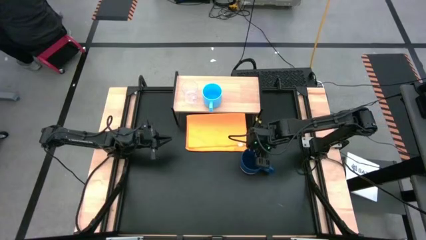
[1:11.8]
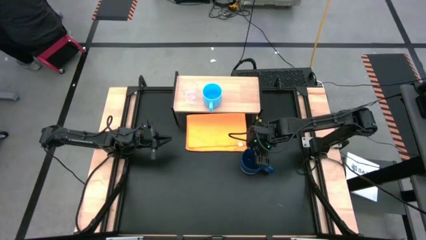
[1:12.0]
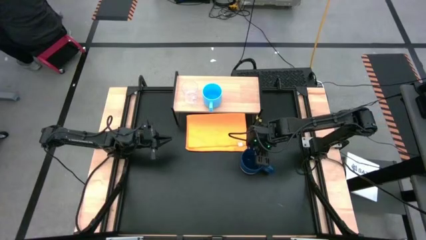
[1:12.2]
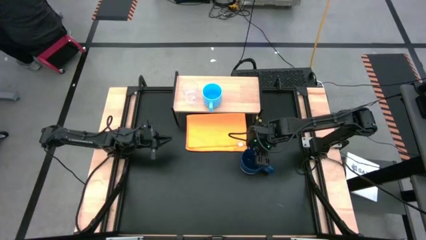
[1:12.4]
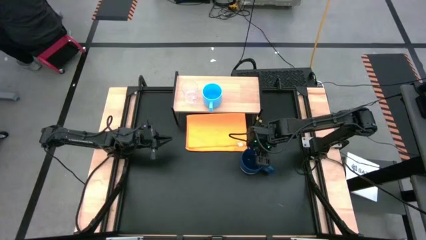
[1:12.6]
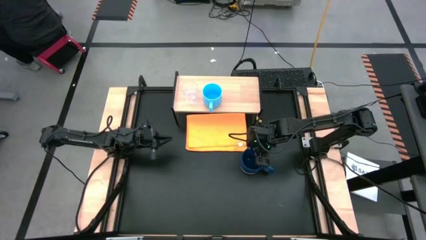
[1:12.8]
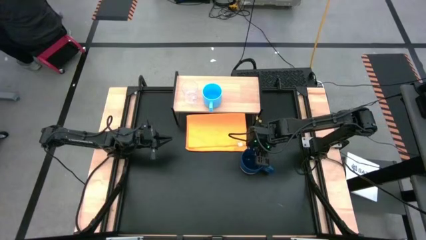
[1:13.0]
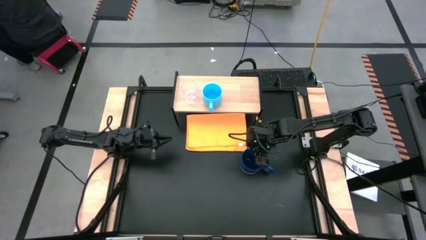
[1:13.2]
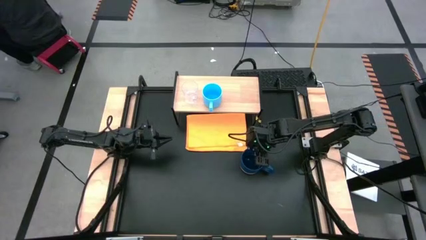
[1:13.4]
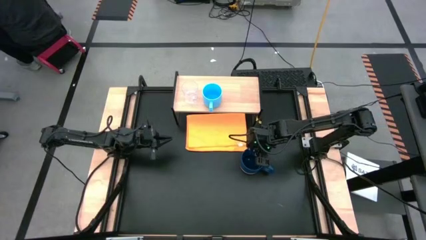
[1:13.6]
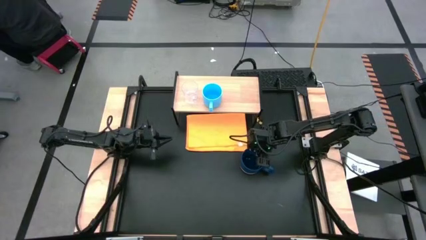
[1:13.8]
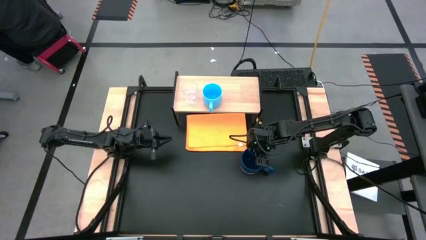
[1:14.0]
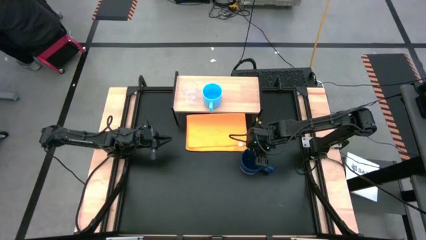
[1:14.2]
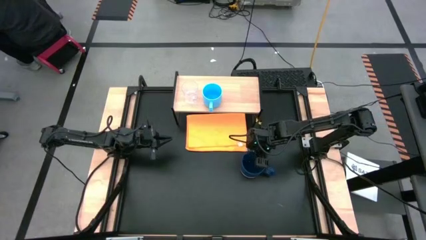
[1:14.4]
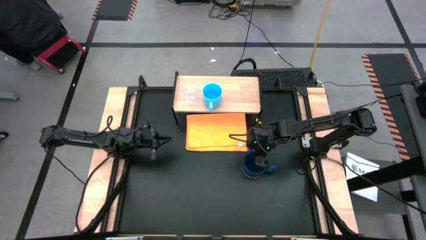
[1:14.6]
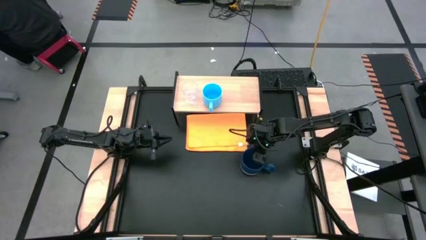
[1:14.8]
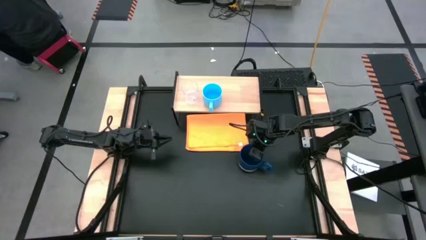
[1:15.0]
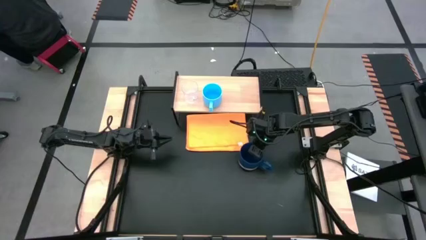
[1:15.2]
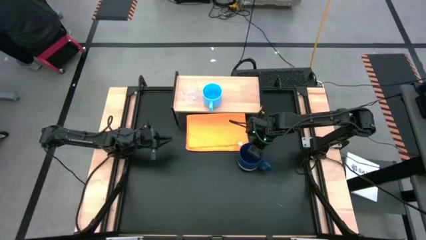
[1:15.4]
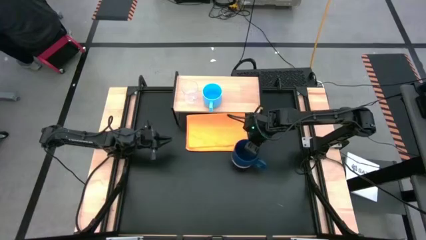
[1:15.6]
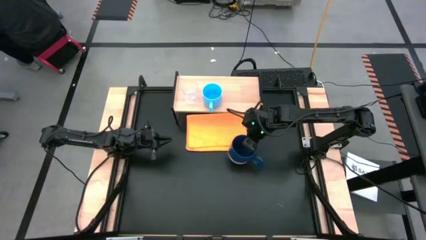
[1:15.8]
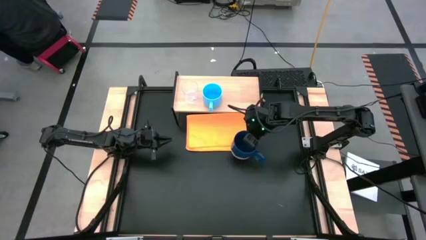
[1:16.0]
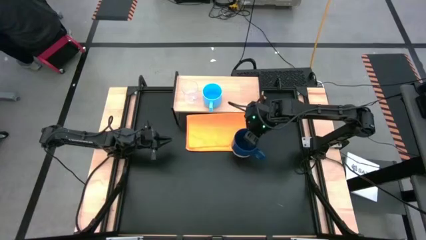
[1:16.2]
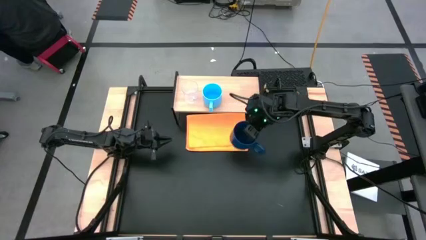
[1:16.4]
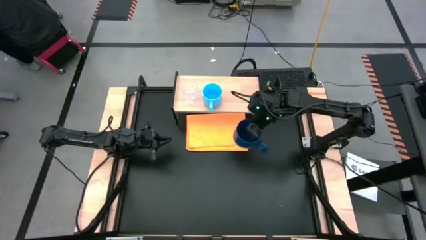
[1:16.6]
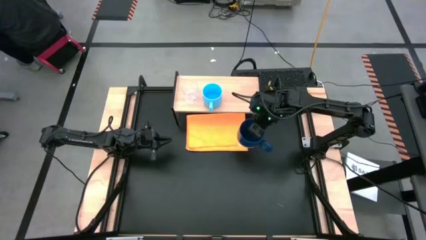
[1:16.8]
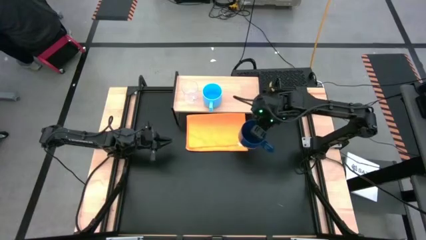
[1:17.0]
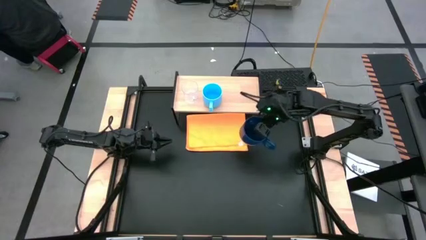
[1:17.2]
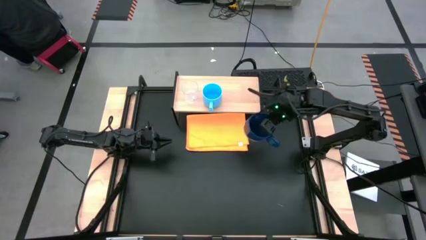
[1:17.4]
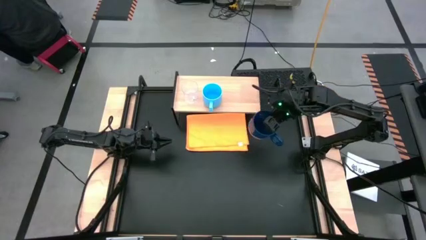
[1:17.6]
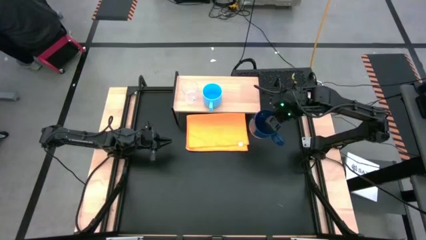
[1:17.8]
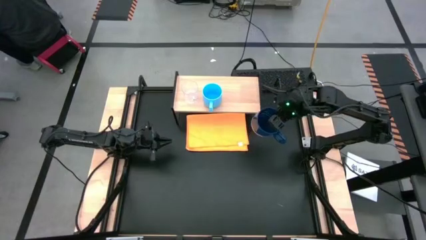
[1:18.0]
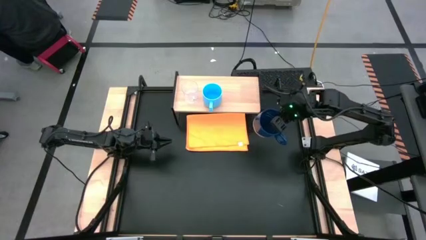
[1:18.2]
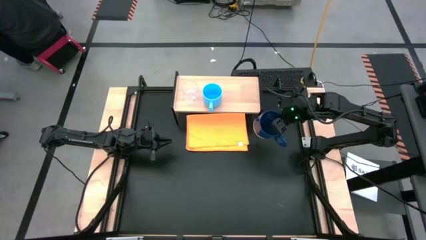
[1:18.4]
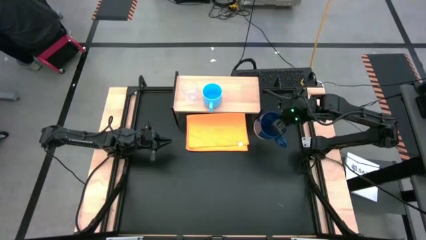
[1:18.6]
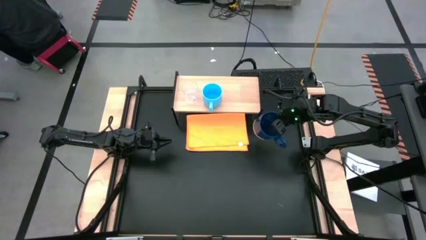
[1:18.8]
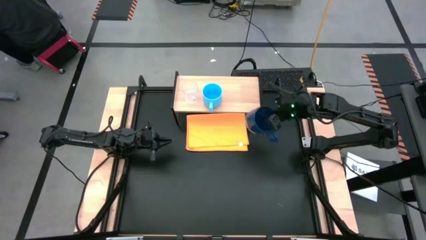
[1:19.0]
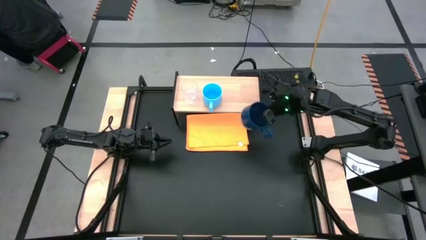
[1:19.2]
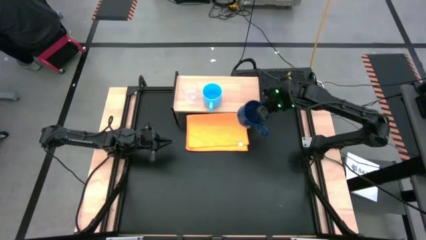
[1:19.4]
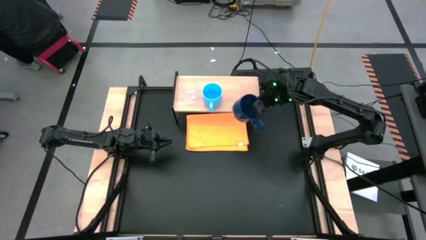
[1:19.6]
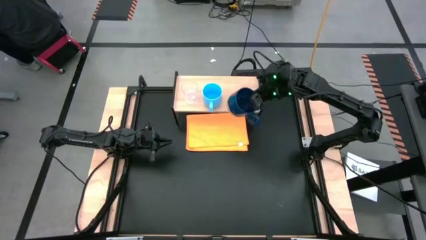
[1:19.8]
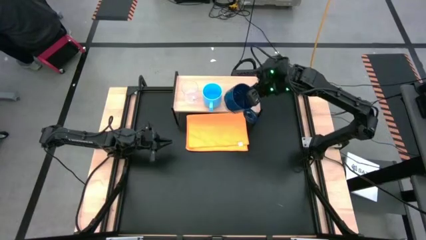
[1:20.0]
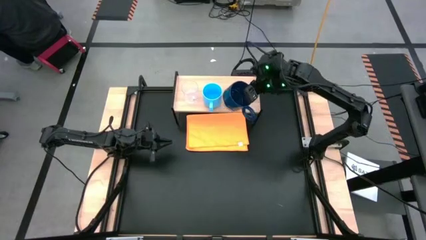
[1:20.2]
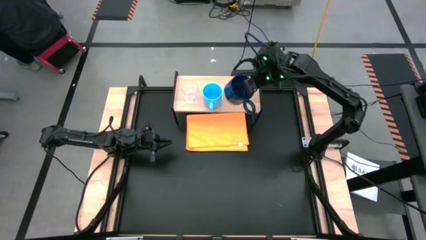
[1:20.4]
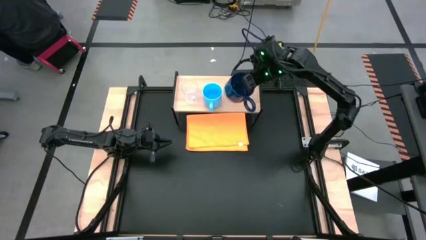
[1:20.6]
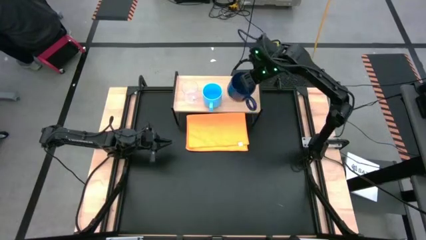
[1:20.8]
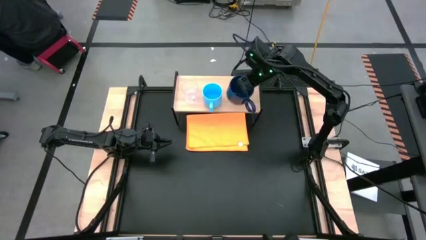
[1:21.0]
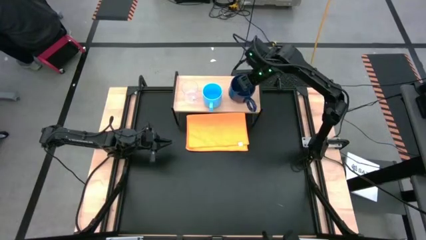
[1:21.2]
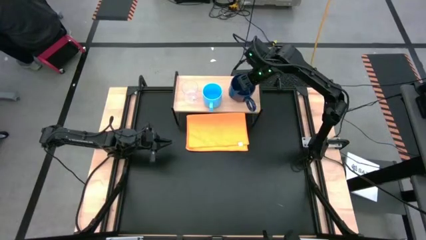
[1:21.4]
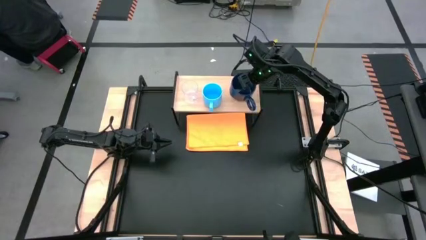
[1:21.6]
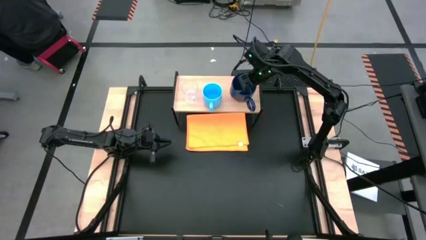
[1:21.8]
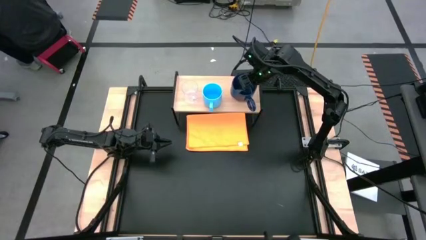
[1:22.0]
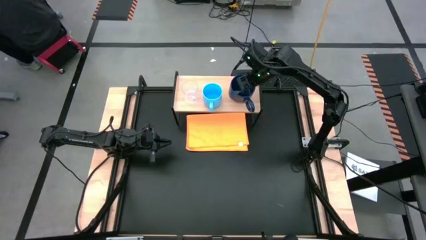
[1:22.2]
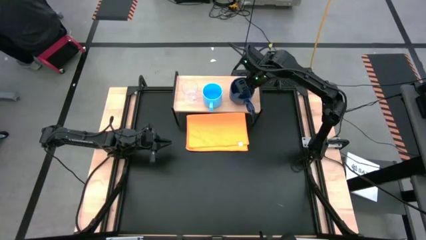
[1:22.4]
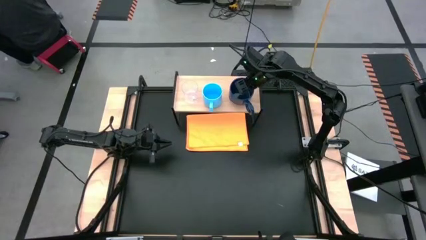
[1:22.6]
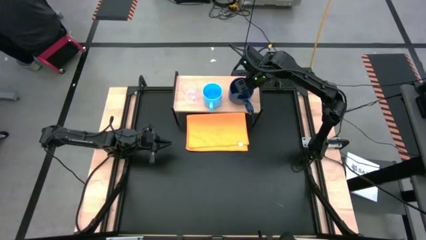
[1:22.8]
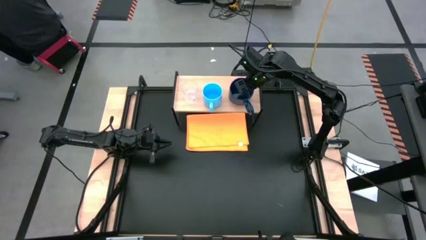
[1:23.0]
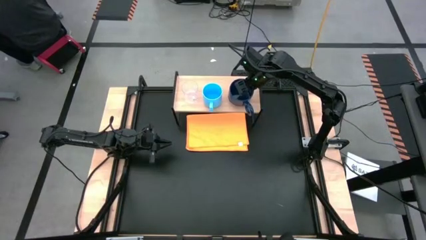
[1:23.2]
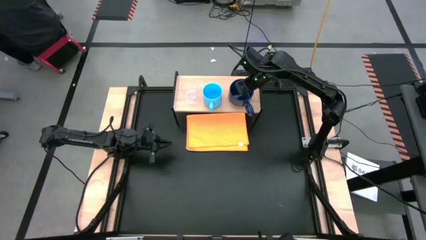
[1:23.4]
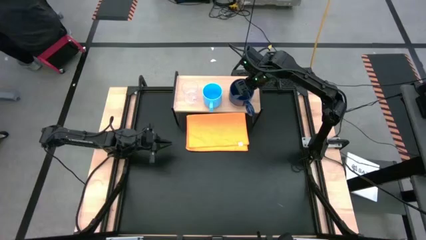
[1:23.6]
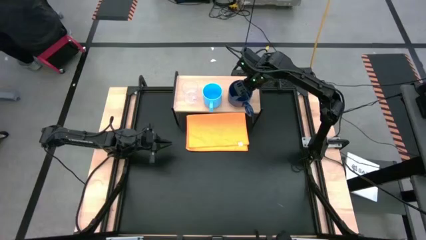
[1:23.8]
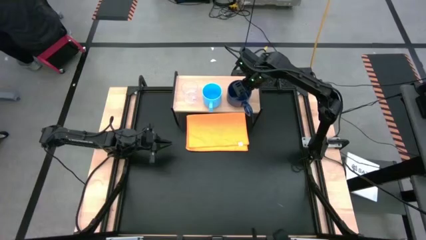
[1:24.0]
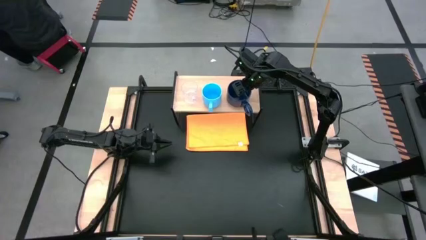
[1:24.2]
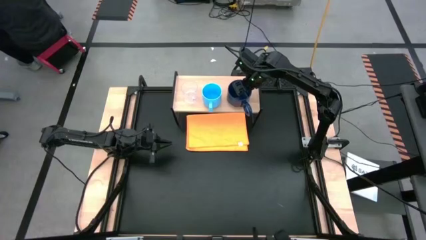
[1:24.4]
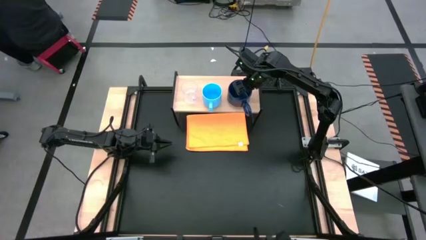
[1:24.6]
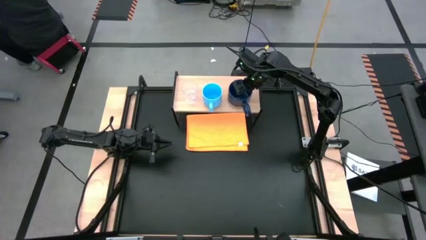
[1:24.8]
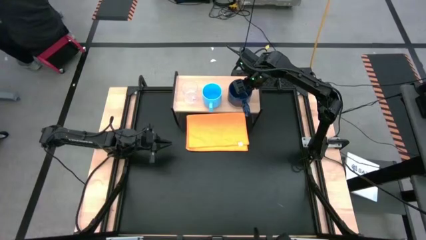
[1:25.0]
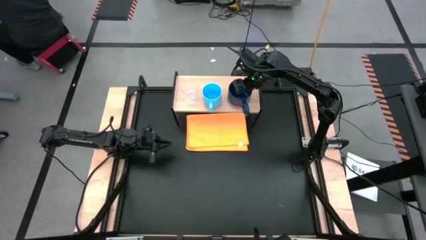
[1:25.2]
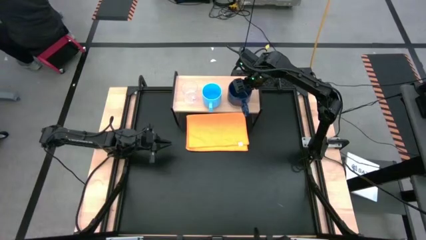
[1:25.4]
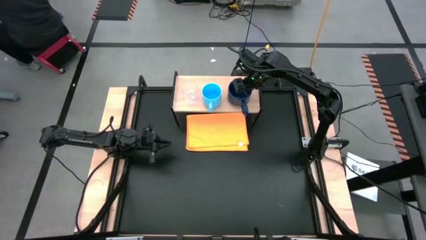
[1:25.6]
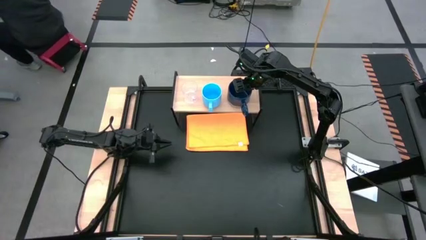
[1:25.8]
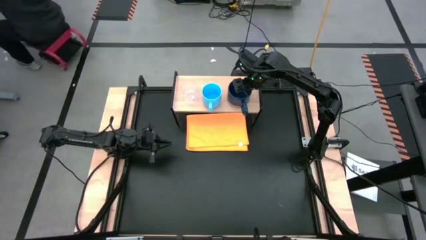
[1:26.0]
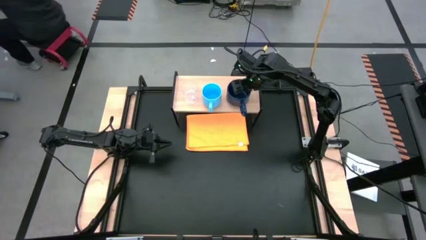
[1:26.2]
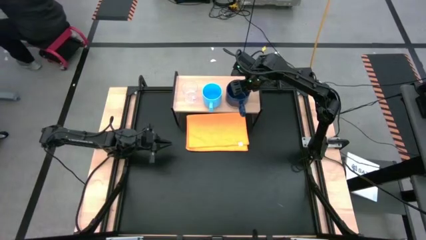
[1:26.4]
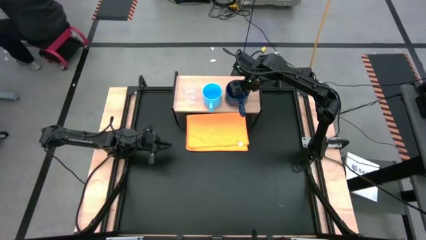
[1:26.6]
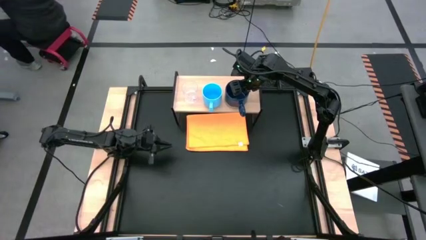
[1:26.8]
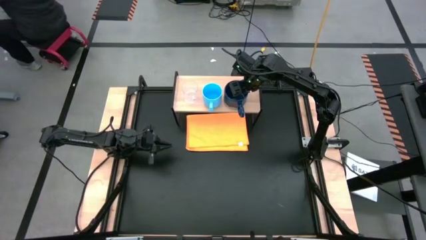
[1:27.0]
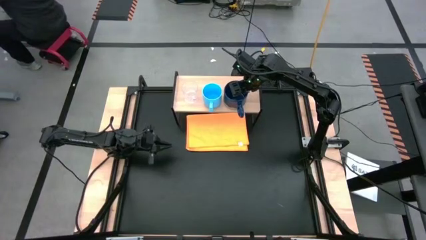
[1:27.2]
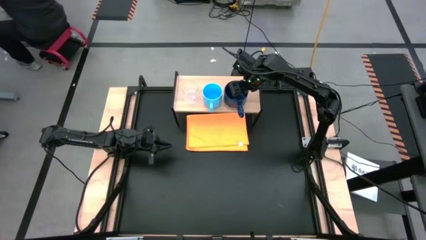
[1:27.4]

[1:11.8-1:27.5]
Task: Stack small to large cups/mugs on shelf
Put the dark blue mug on the shelf
